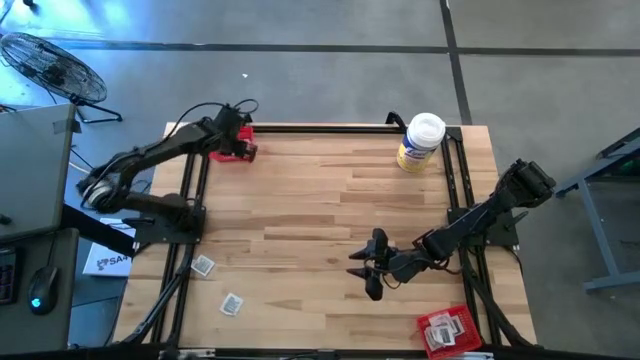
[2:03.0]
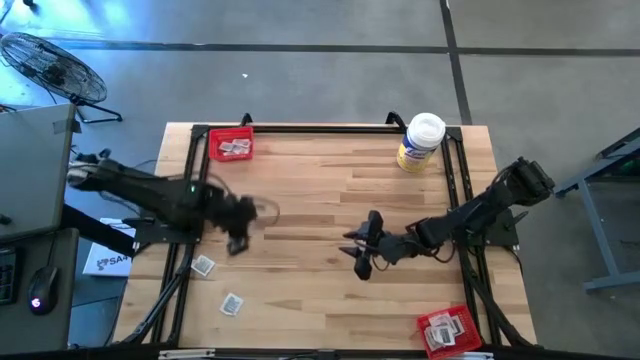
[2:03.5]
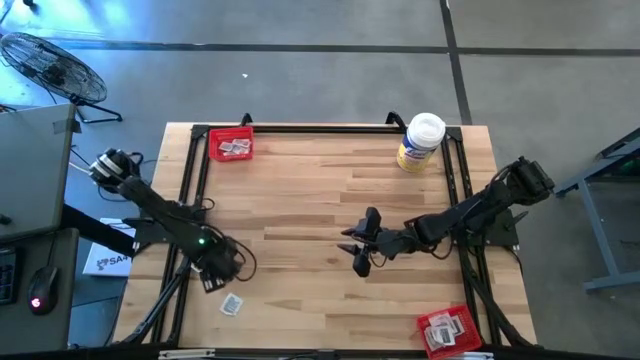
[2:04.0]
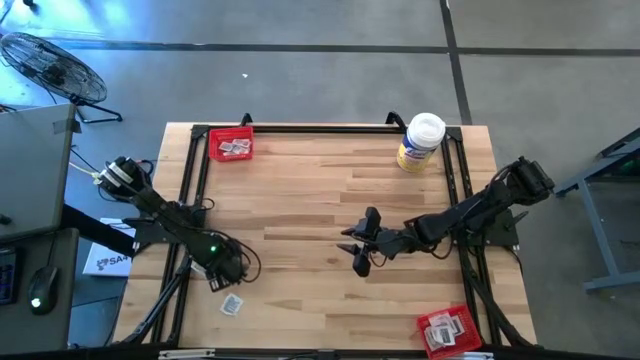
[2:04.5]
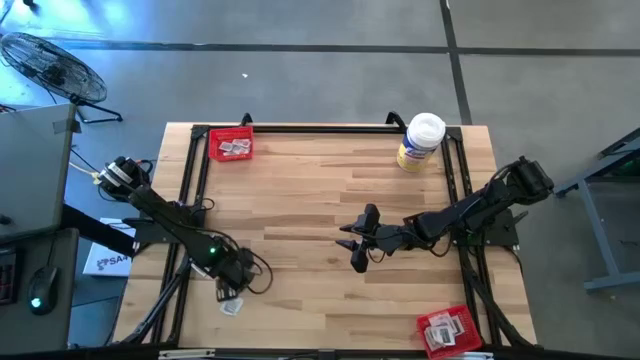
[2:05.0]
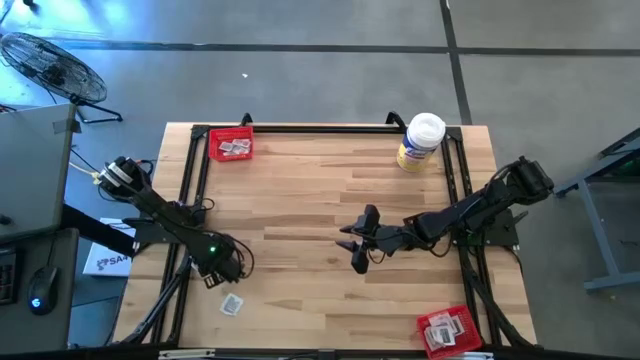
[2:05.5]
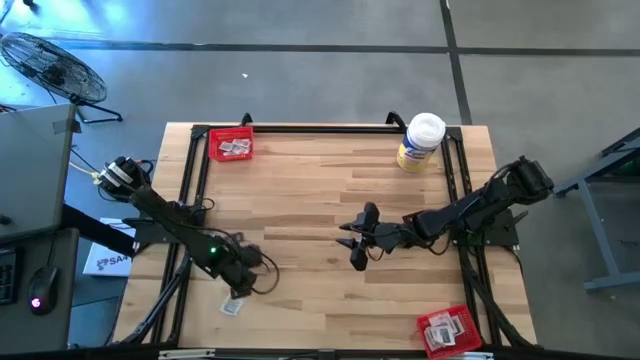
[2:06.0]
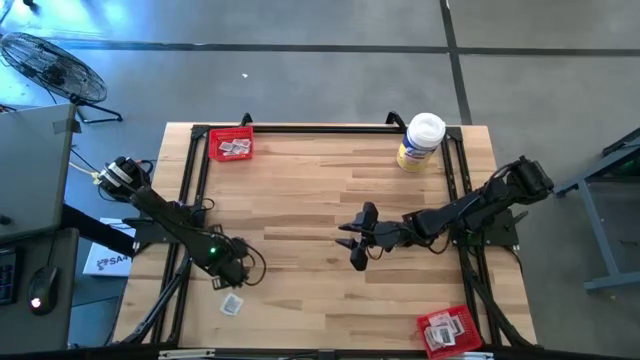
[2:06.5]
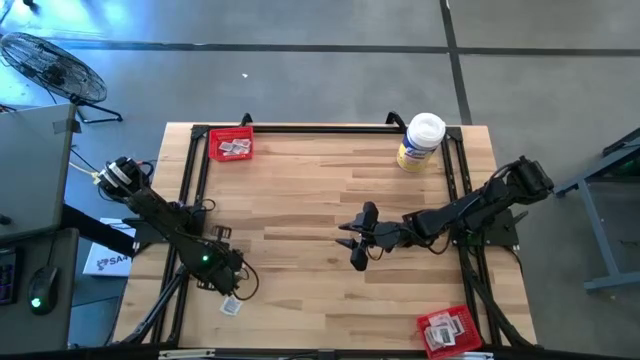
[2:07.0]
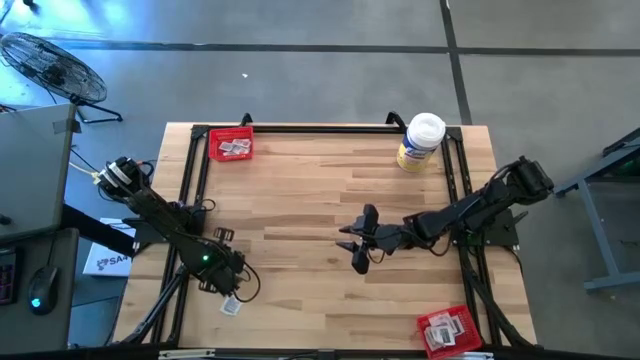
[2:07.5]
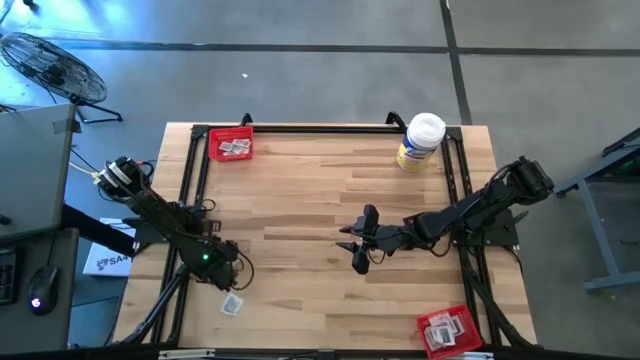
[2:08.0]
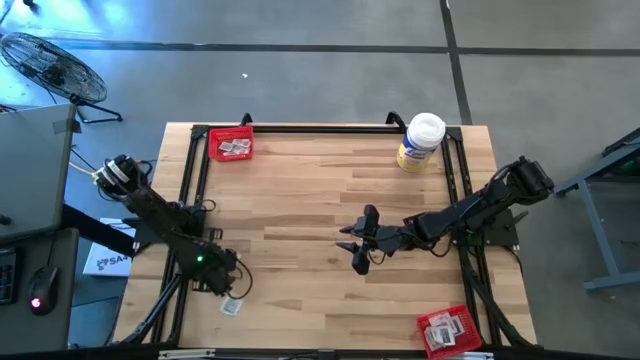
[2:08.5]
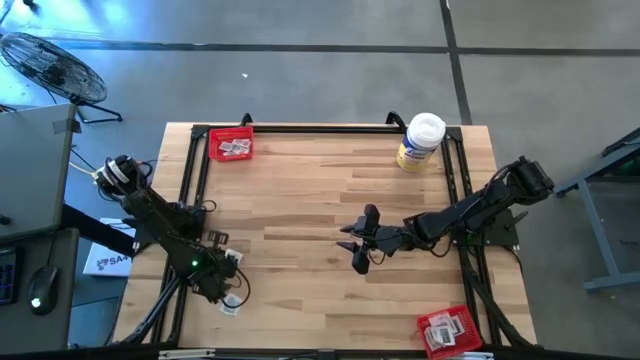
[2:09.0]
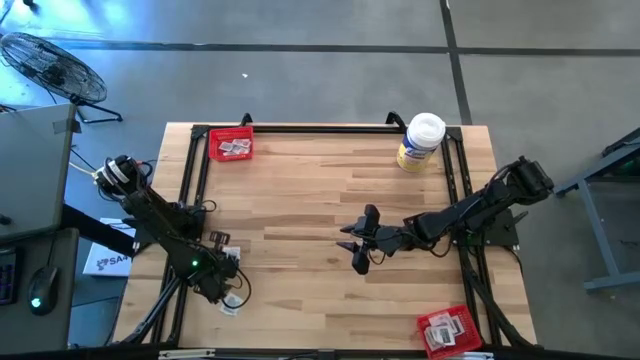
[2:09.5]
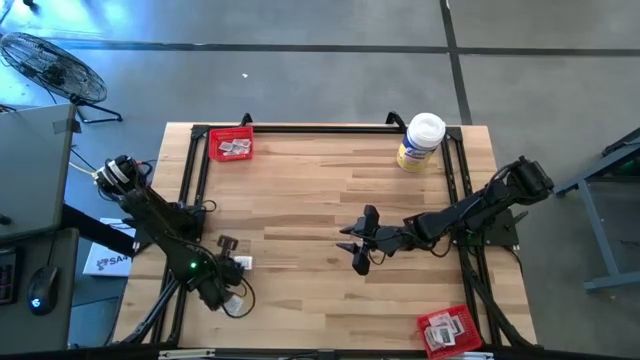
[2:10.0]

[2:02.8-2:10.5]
Task: Pick & Place First Aid Supplies
Put the white and gray towelette pack into the bottom red bin

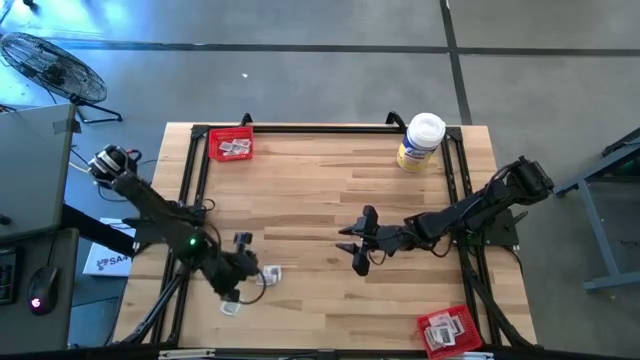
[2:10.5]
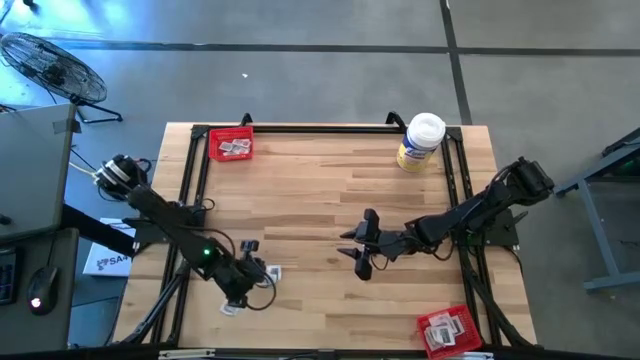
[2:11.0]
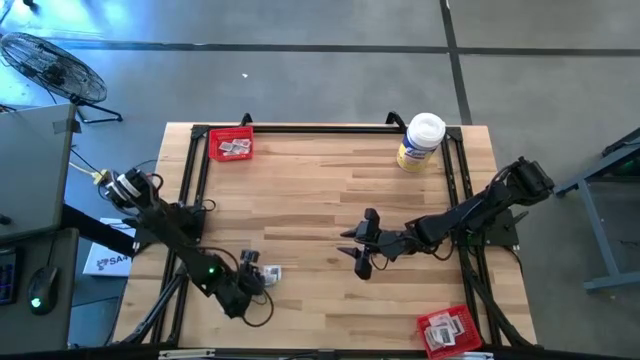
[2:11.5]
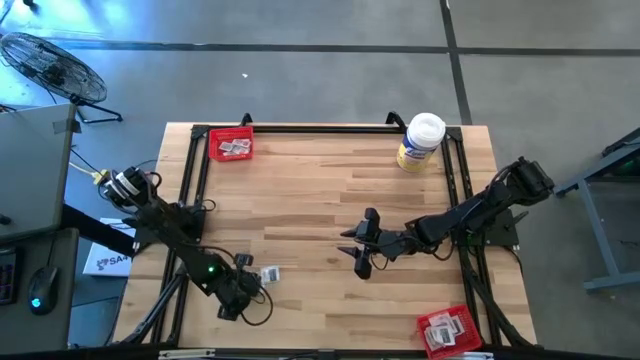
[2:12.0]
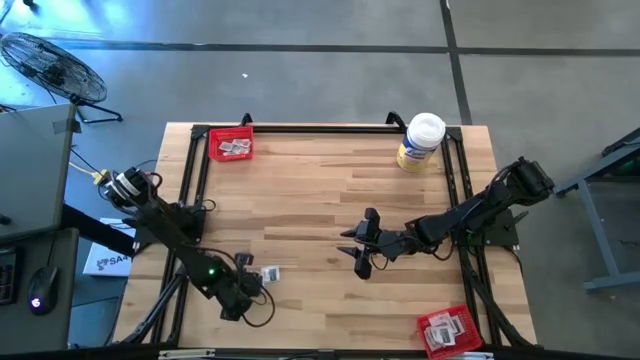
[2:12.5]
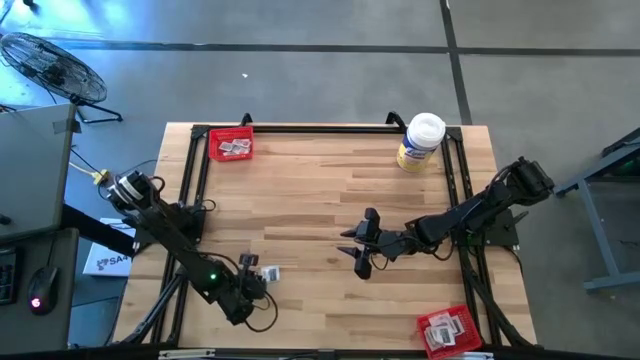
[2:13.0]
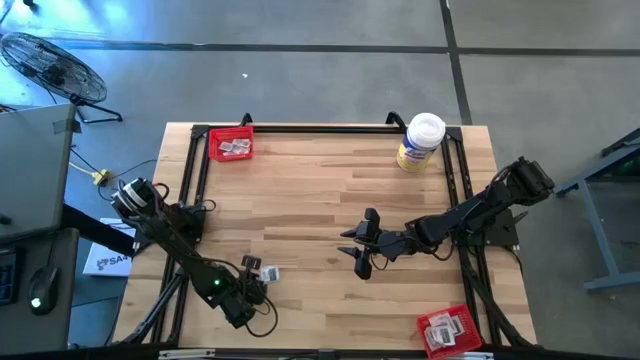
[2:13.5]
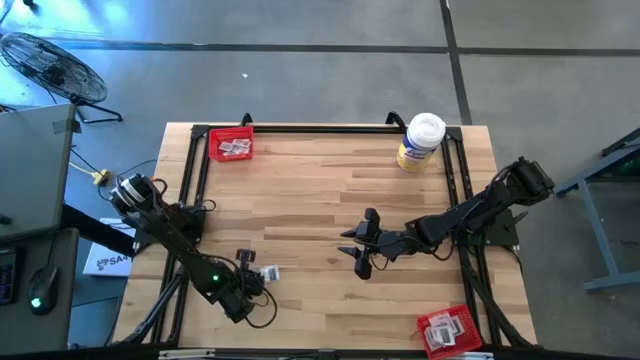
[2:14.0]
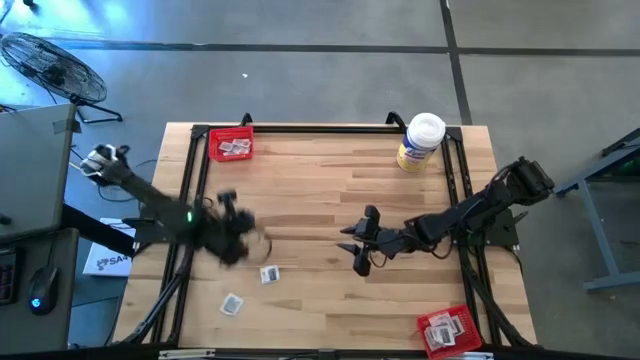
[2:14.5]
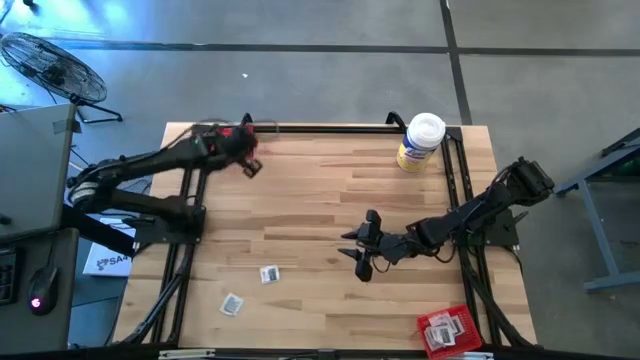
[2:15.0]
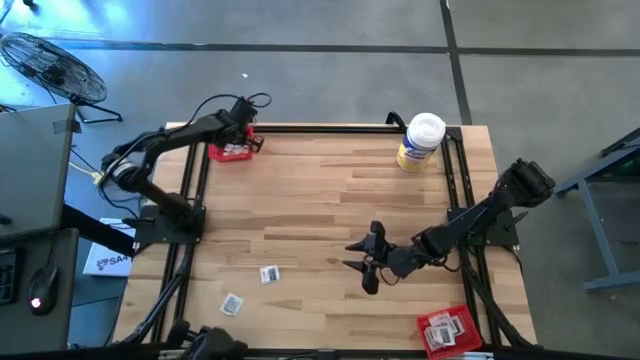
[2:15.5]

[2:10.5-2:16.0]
Put the white and orange ointment pack into the top red bin

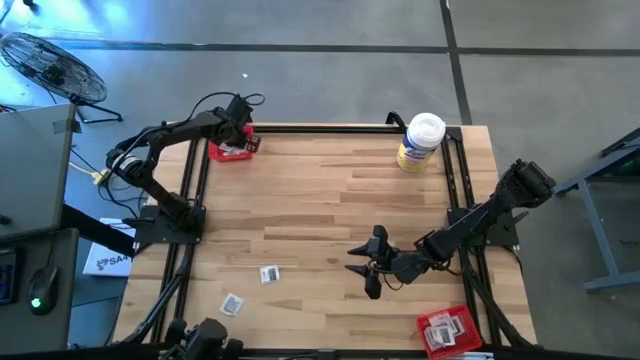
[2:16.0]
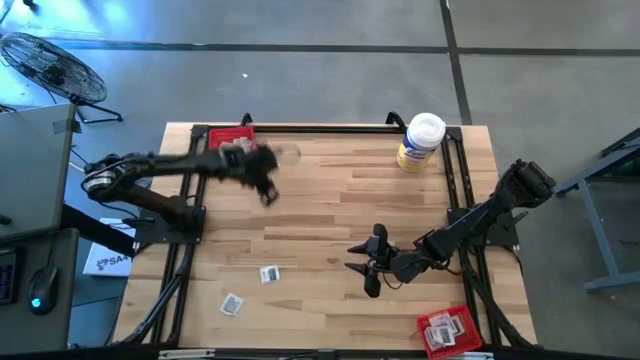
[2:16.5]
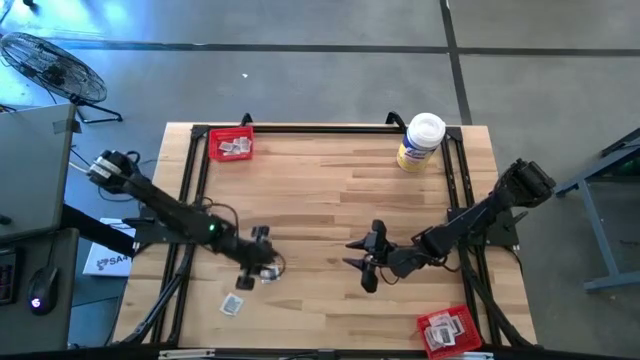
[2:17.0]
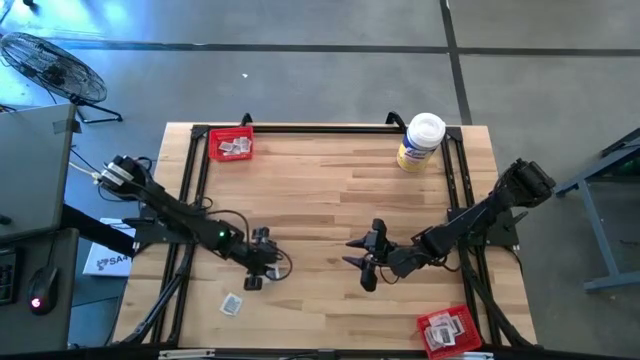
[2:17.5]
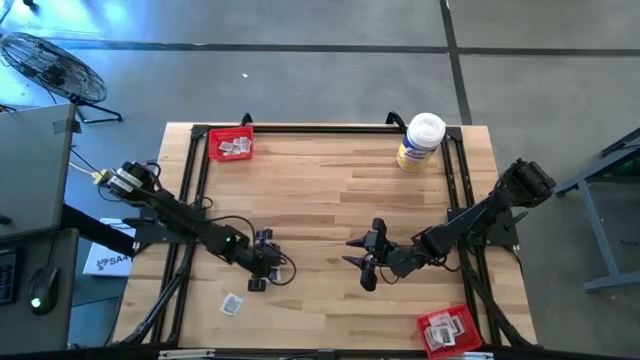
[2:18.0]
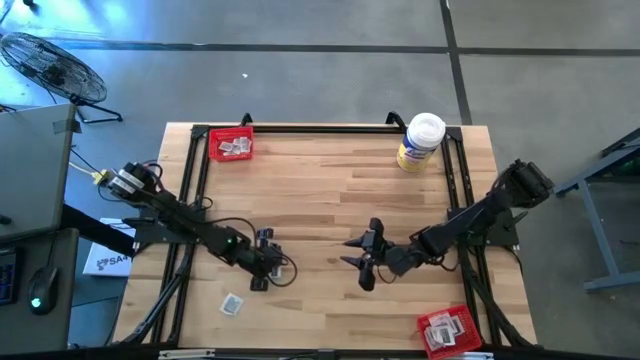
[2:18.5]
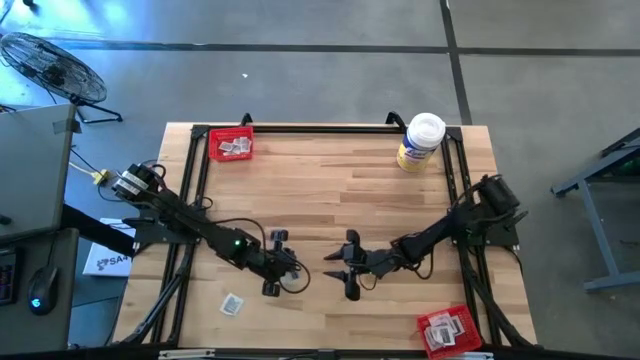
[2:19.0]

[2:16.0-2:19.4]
Put the white and gray towelette pack into the bottom red bin

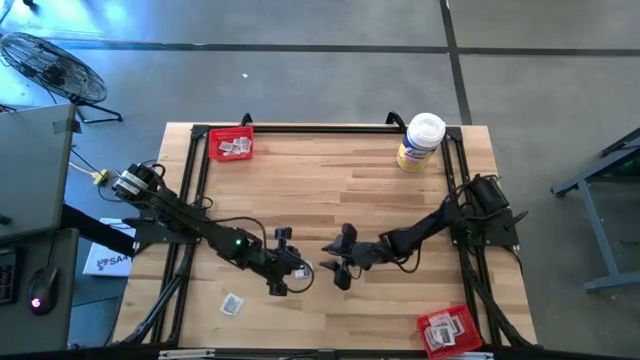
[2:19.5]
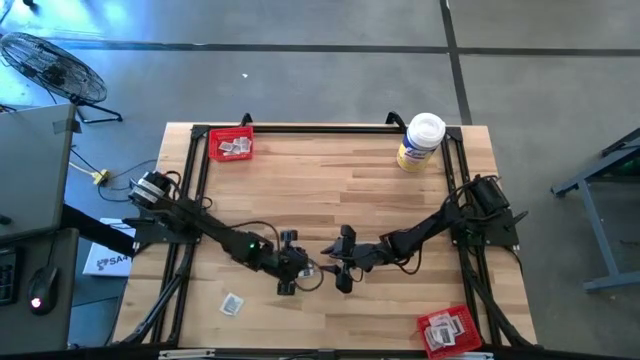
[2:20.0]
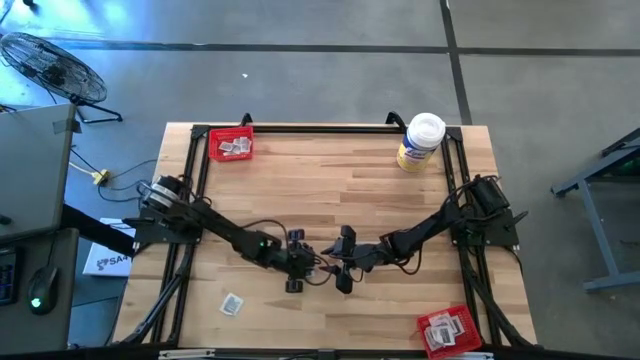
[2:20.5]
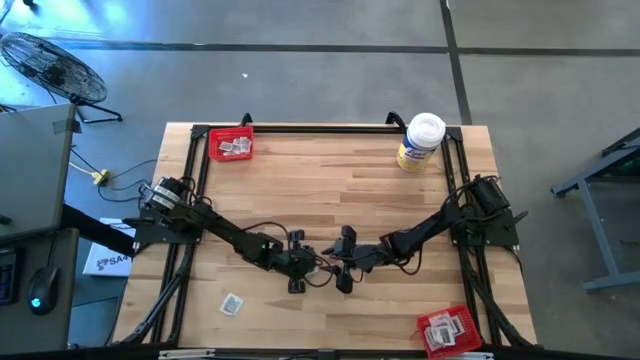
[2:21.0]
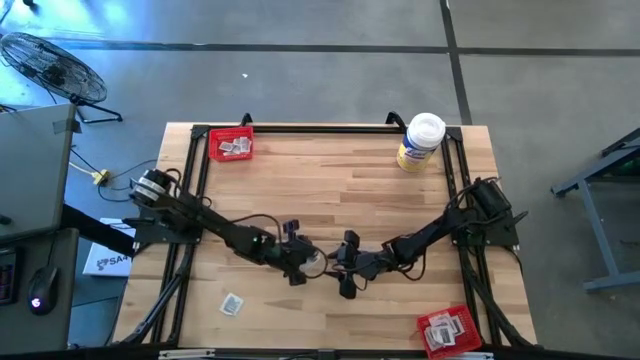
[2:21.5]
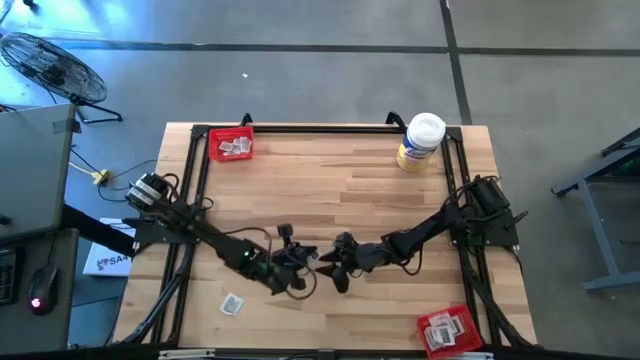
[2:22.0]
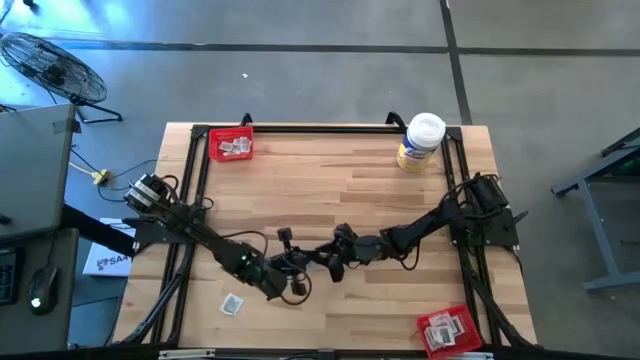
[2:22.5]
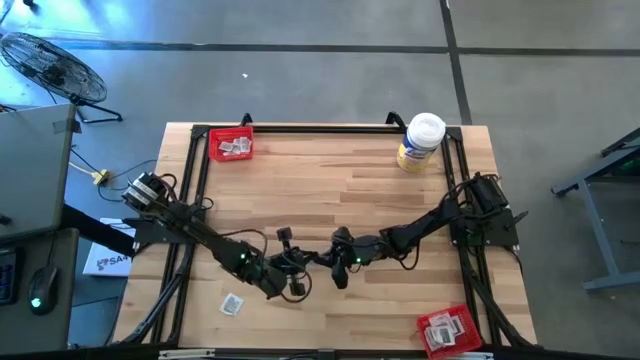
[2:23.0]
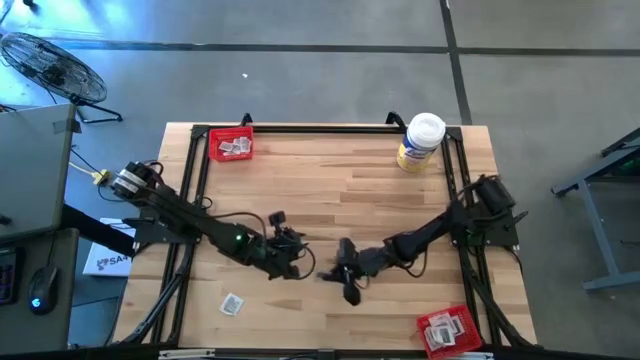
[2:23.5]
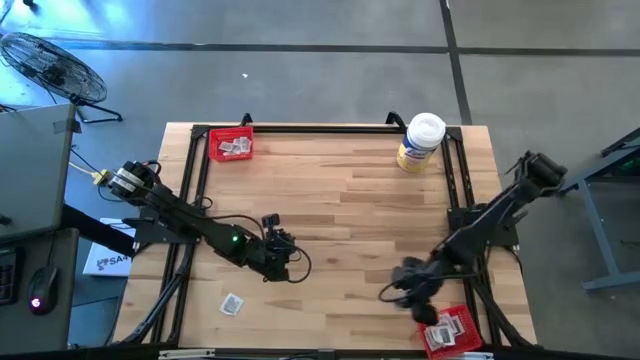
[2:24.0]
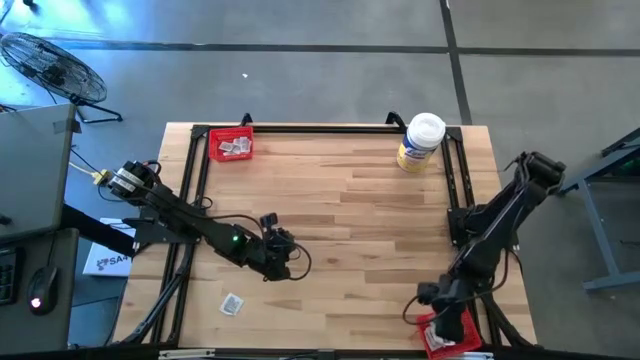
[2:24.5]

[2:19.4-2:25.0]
Put the white and gray towelette pack into the bottom red bin
